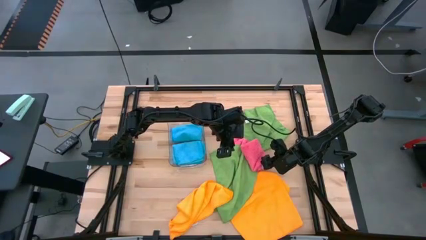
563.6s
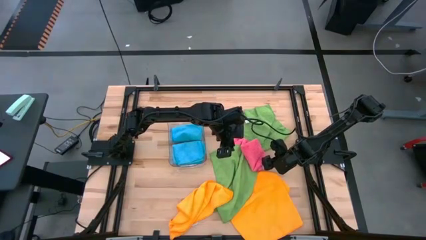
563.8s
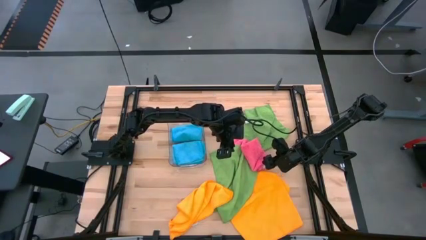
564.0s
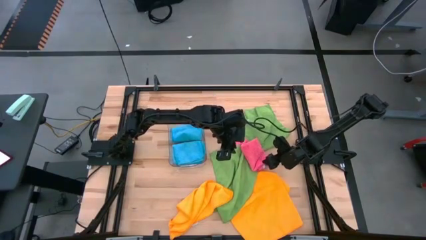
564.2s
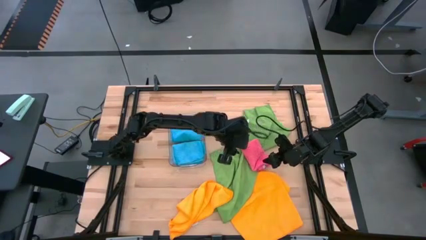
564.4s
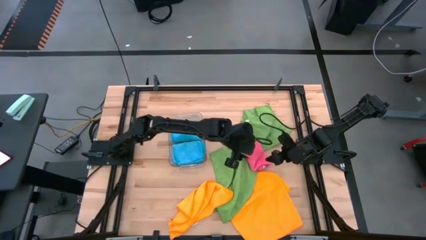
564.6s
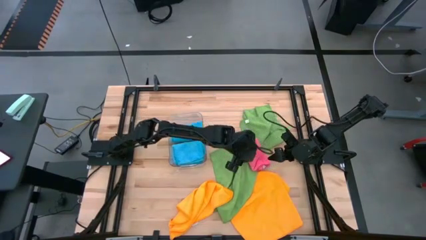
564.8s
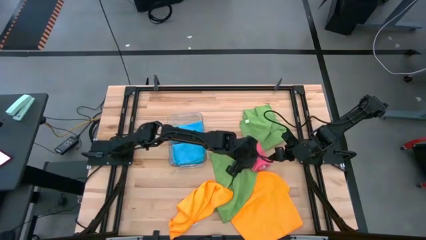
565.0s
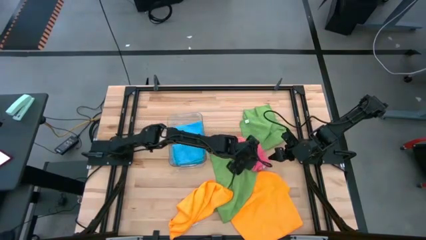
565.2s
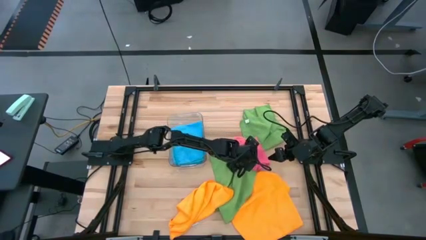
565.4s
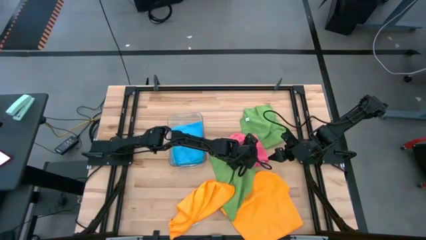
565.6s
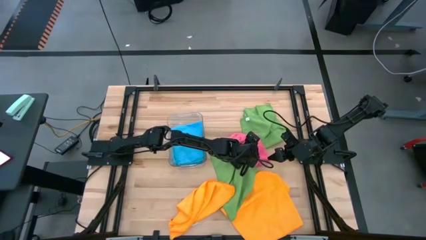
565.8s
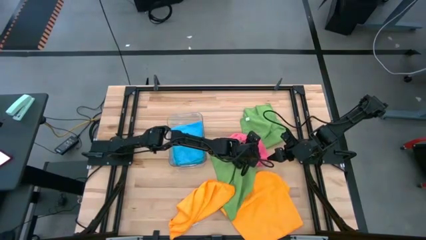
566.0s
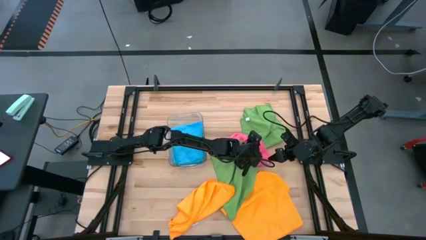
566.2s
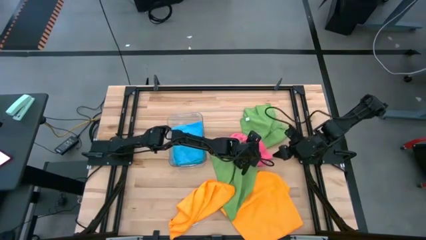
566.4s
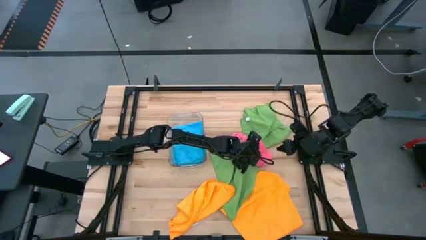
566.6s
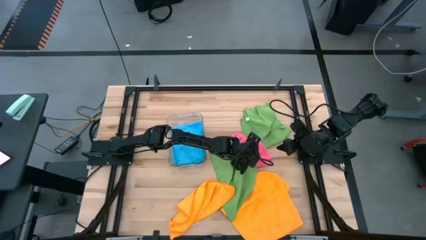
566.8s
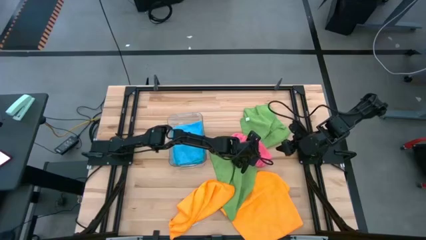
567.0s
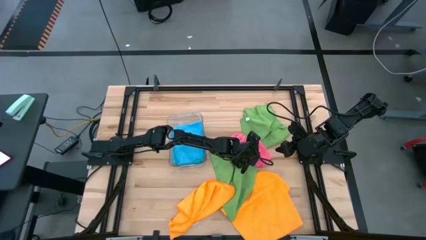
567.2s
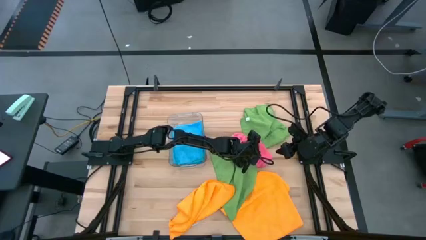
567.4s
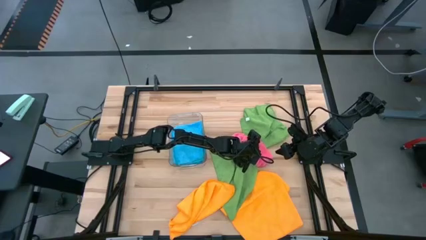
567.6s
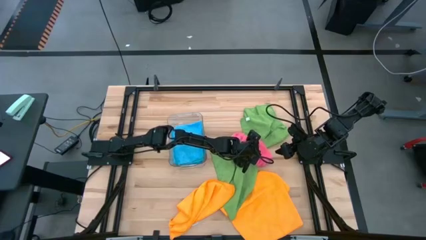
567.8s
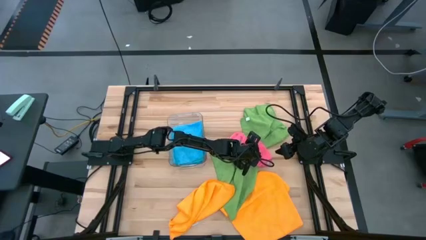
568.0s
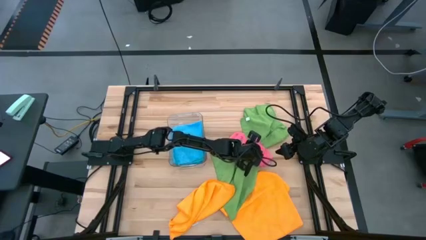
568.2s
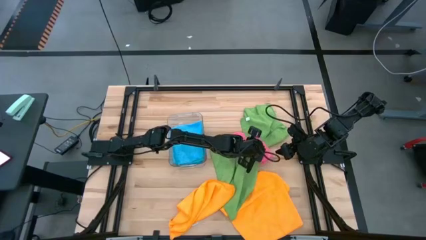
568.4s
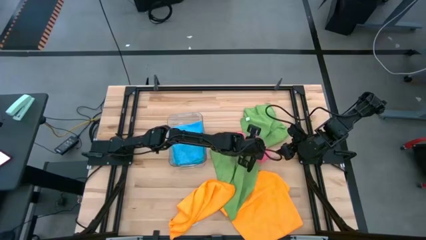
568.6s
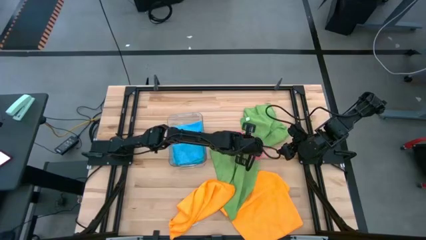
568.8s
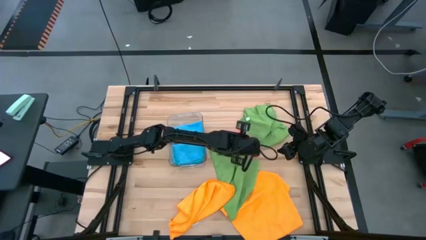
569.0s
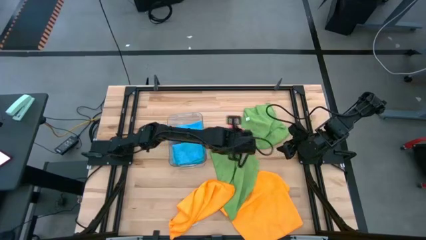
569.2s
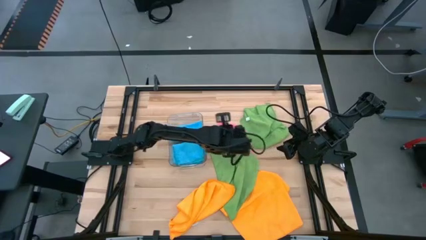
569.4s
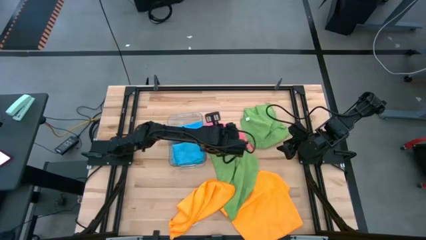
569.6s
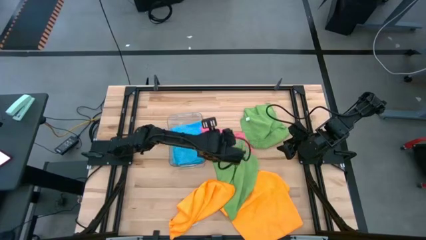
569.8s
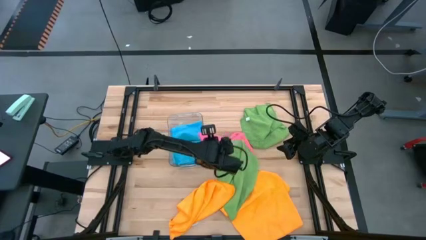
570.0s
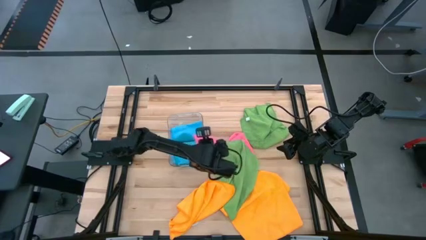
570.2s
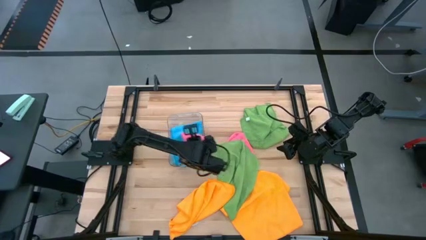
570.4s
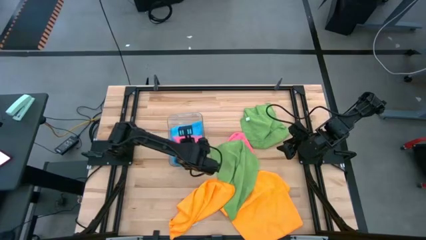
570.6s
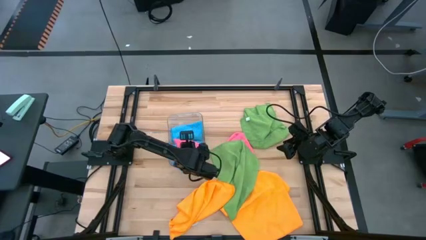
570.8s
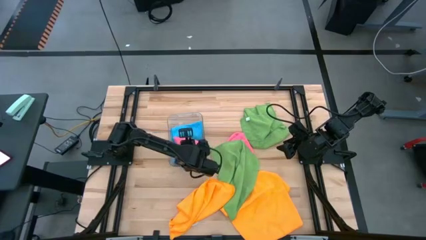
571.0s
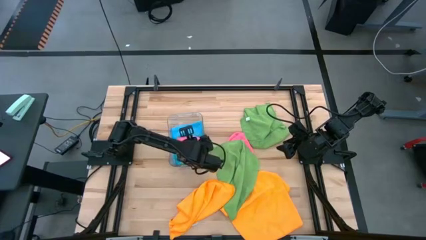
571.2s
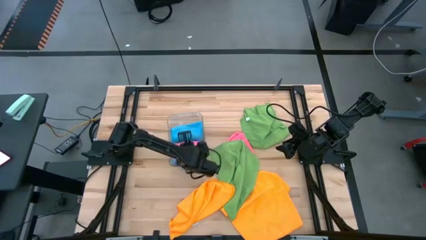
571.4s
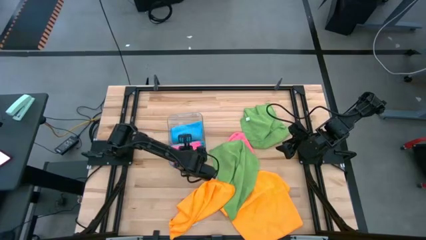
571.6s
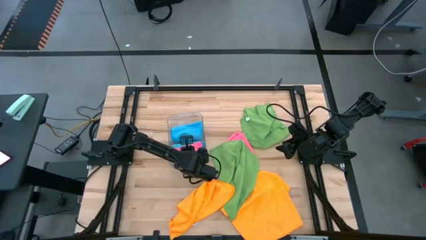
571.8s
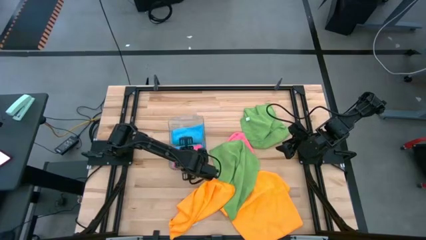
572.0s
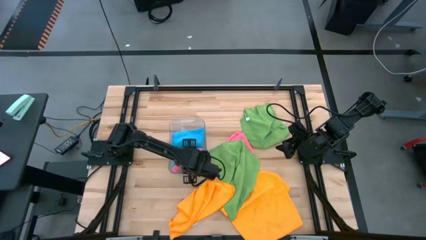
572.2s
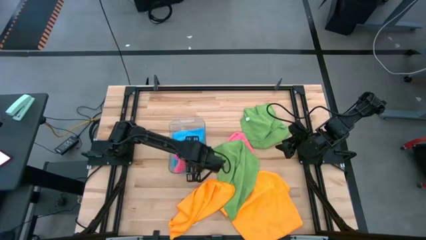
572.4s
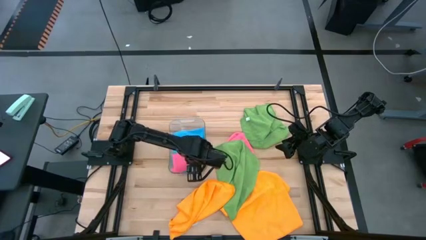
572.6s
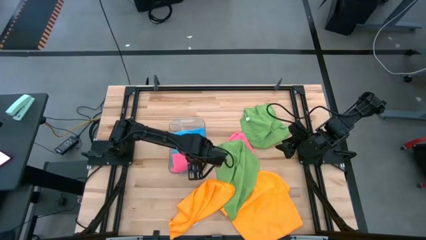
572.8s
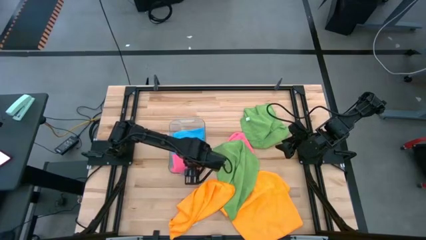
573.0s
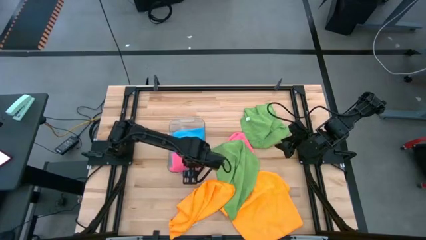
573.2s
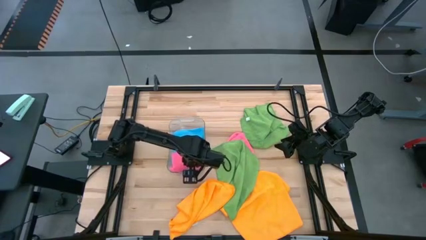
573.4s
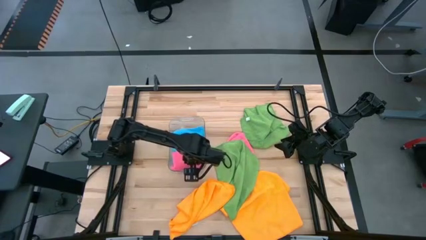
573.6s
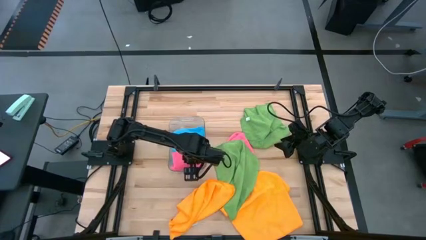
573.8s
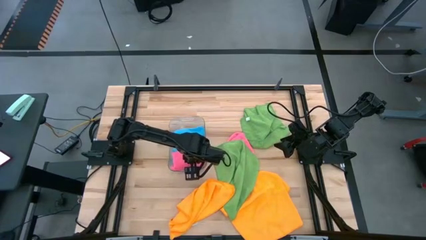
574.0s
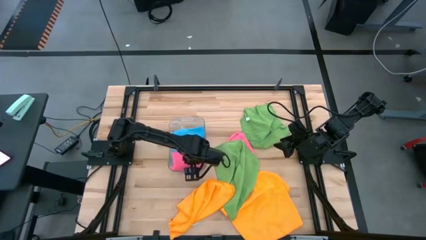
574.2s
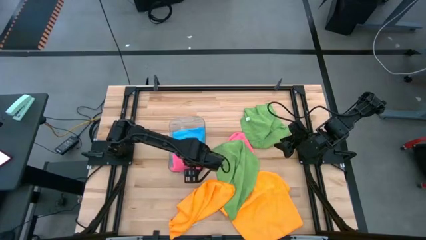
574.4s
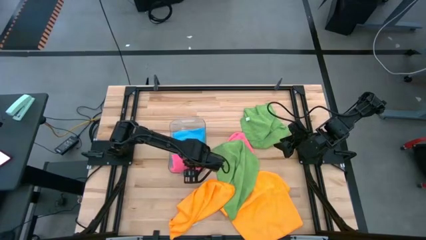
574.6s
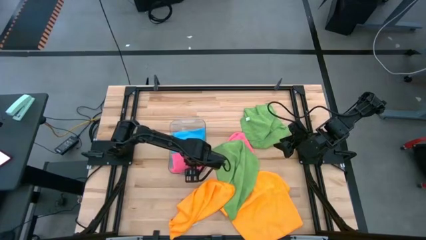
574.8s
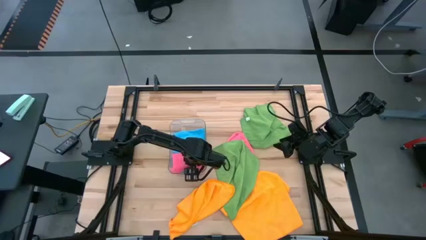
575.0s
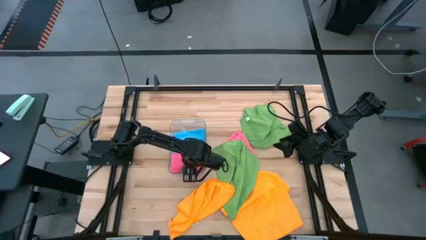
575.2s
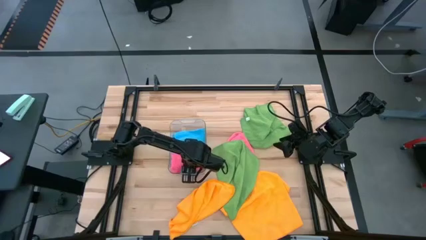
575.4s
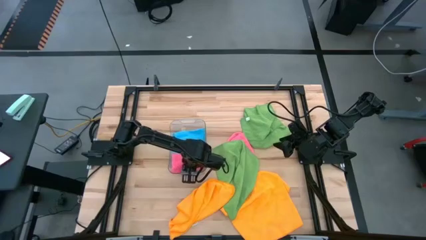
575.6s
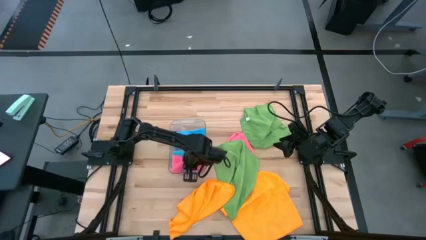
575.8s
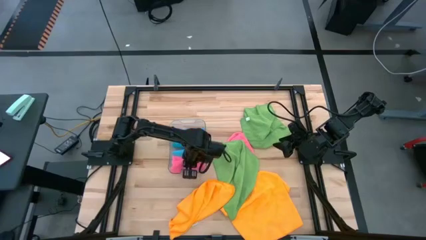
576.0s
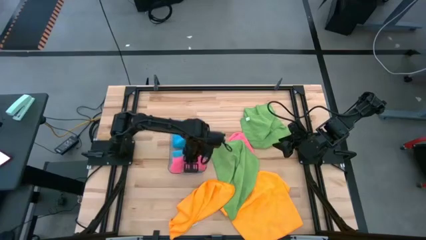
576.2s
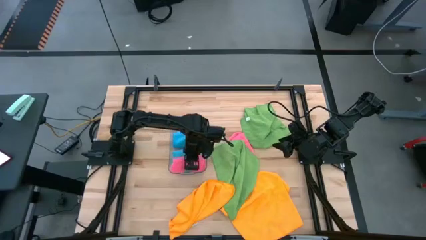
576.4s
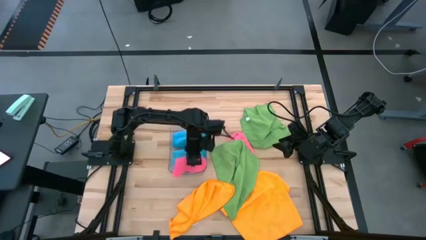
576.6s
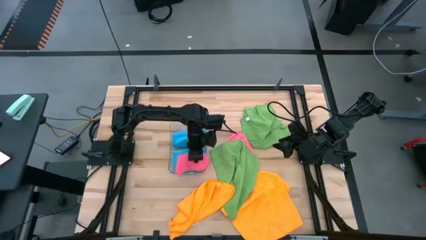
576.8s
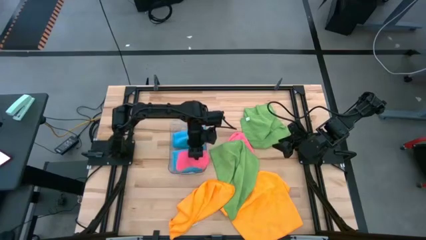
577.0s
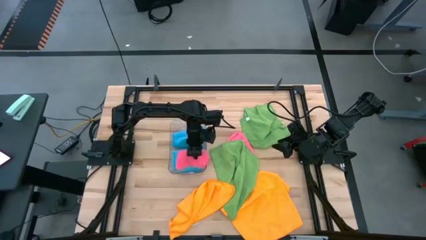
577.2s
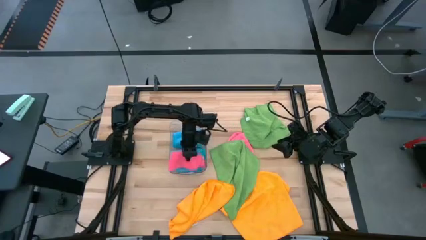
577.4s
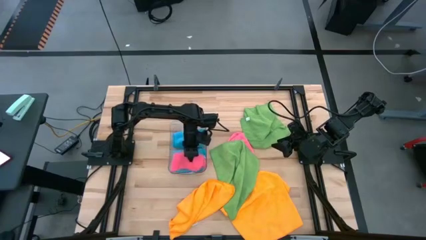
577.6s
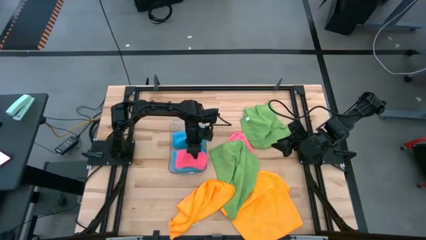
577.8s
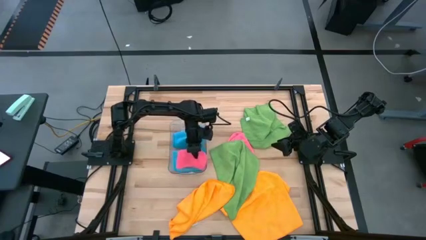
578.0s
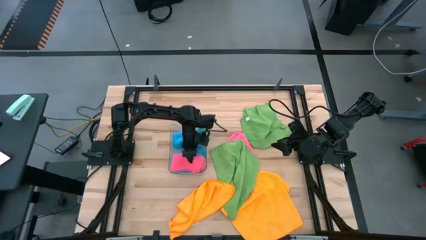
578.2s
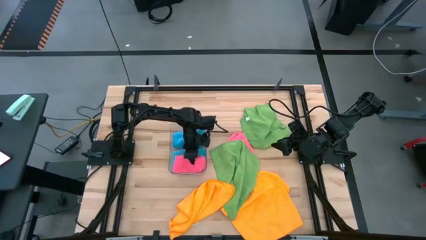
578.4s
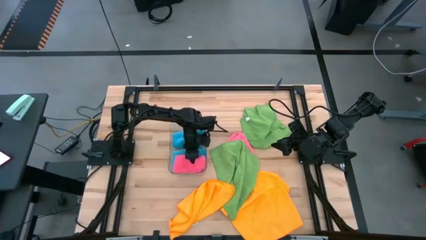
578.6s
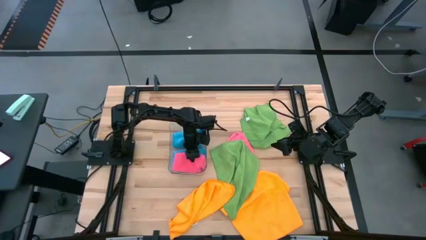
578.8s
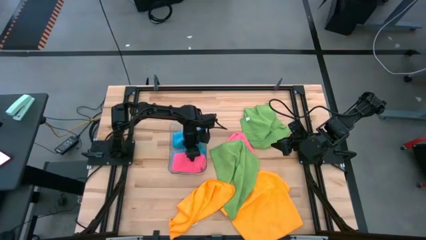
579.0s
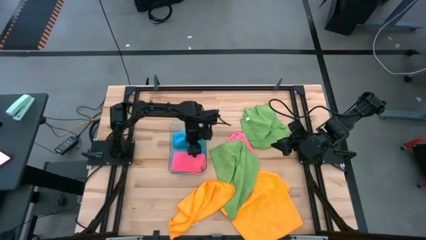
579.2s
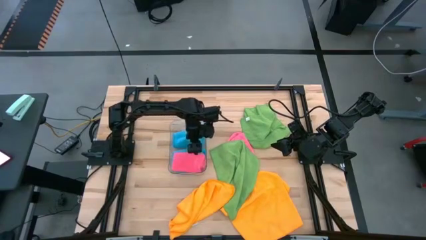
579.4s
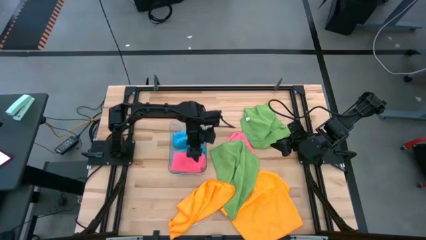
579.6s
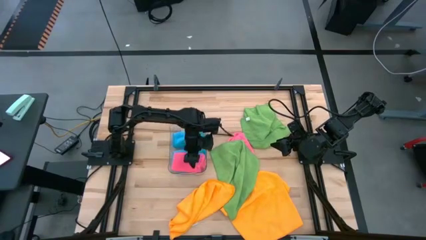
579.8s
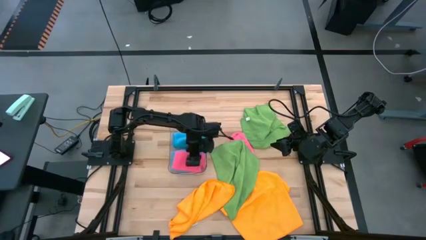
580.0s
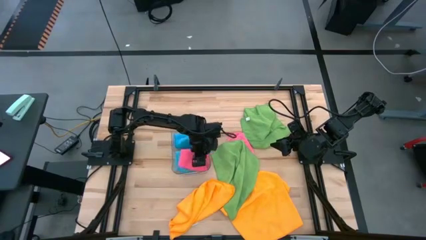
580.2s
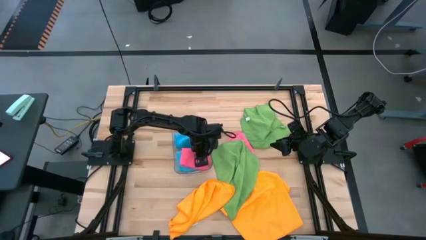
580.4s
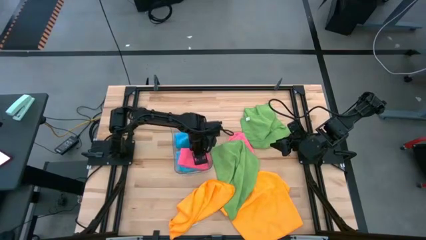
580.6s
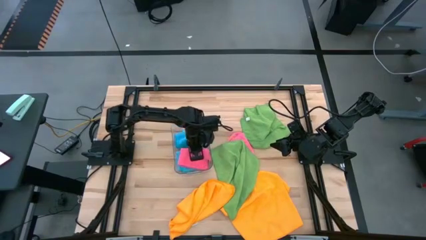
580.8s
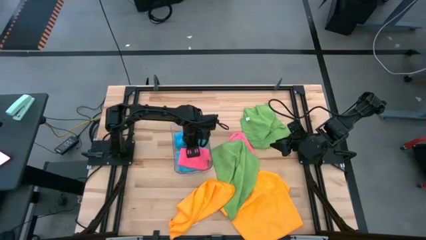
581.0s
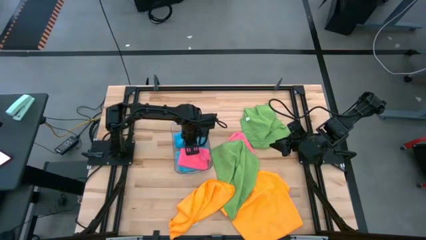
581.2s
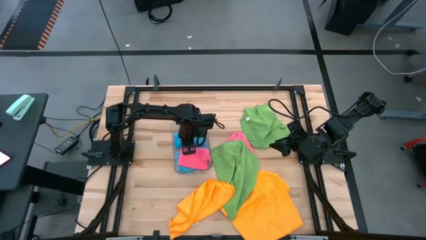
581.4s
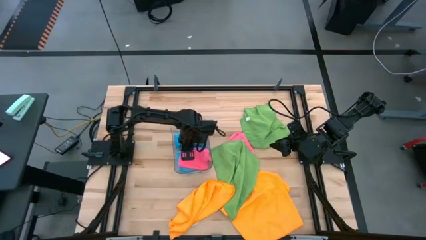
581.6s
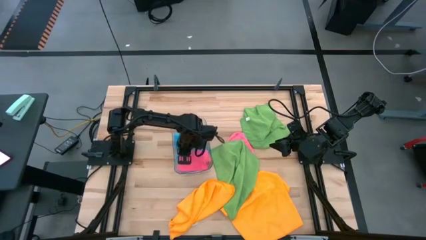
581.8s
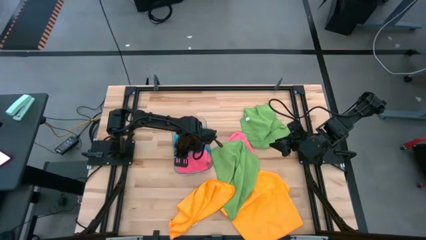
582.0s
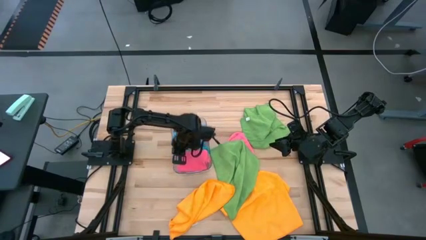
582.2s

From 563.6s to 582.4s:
Task: Fold microfiber towels
Put the top pink towel into the transparent bin
